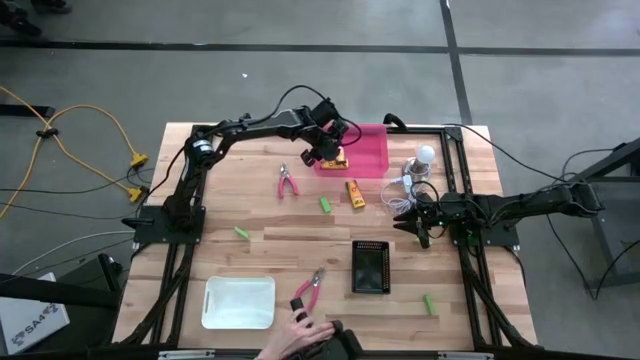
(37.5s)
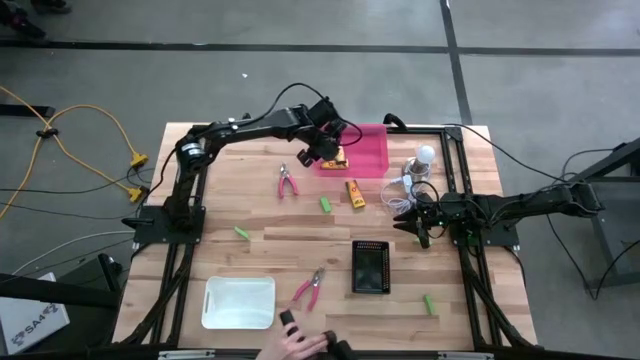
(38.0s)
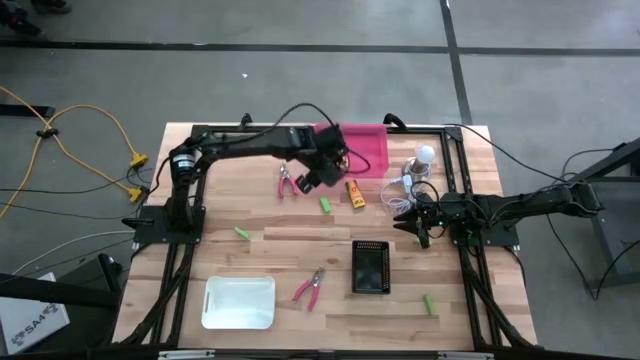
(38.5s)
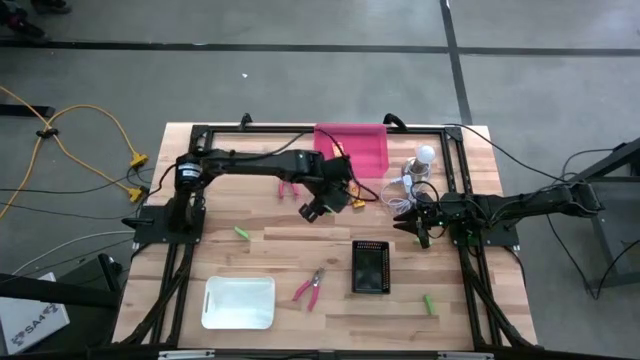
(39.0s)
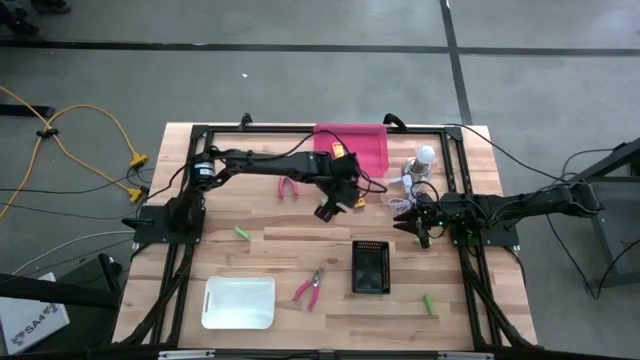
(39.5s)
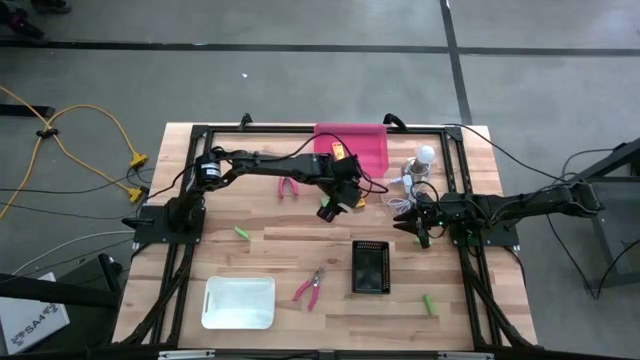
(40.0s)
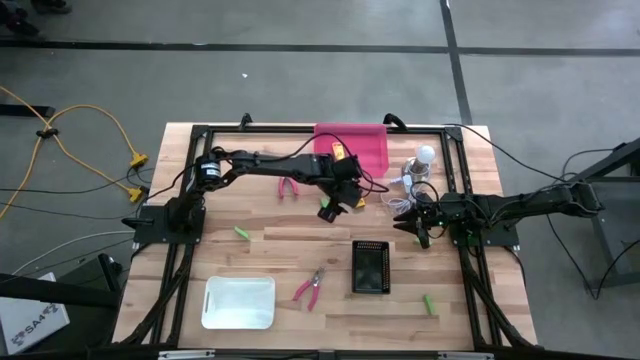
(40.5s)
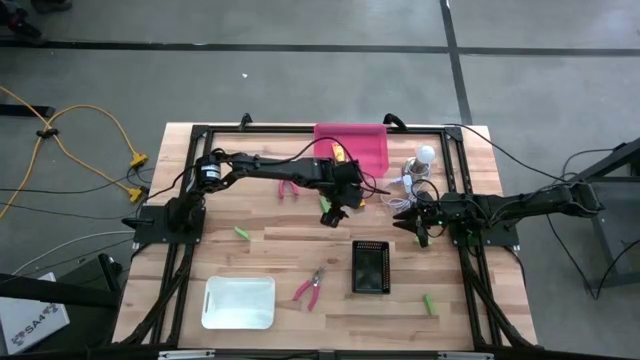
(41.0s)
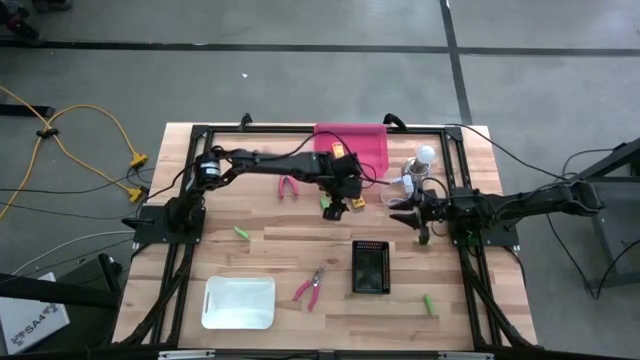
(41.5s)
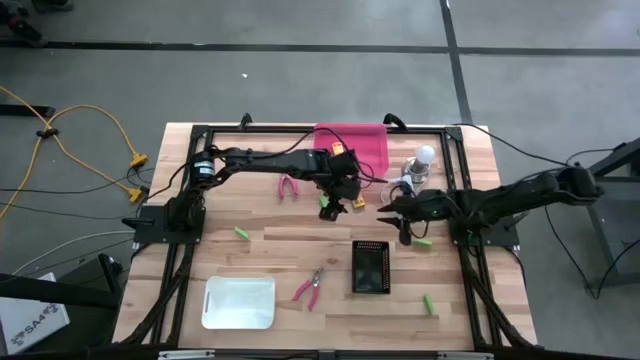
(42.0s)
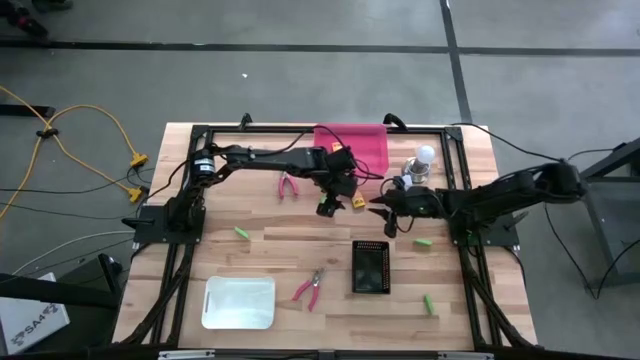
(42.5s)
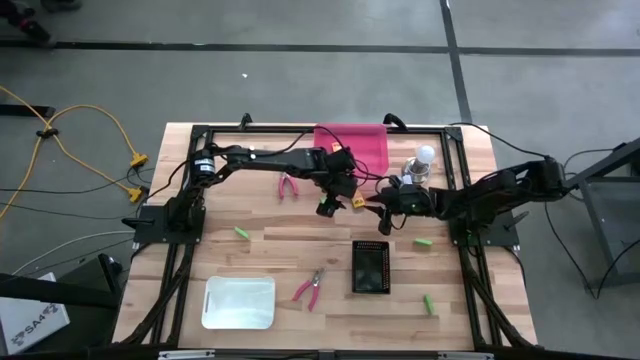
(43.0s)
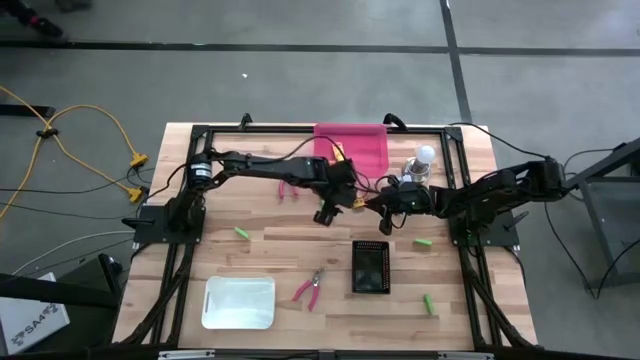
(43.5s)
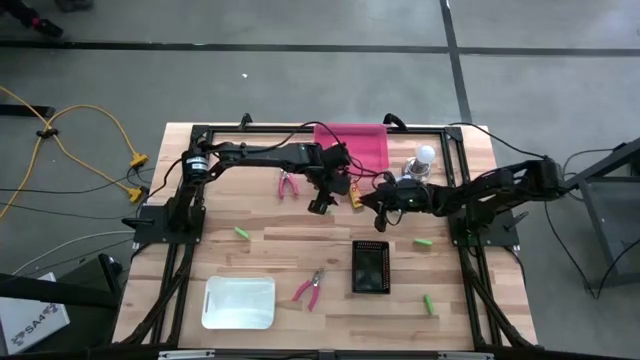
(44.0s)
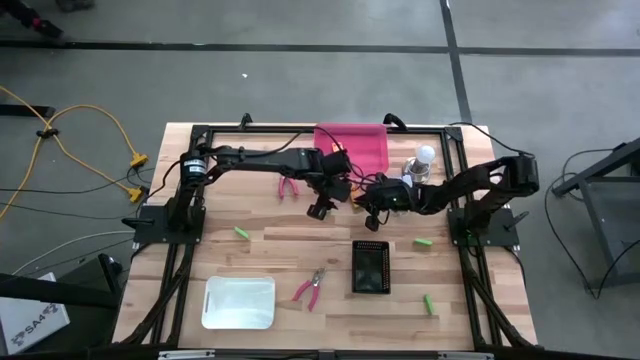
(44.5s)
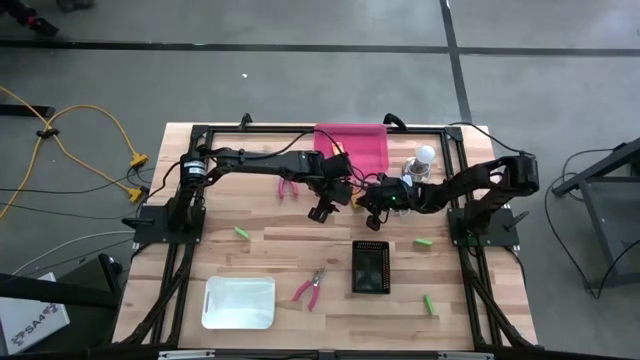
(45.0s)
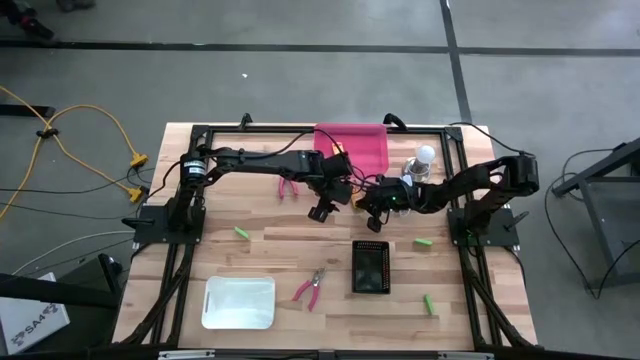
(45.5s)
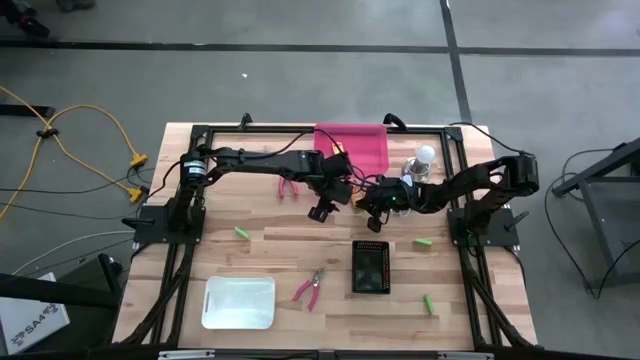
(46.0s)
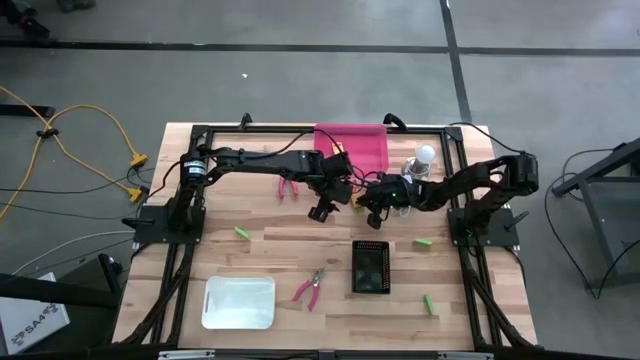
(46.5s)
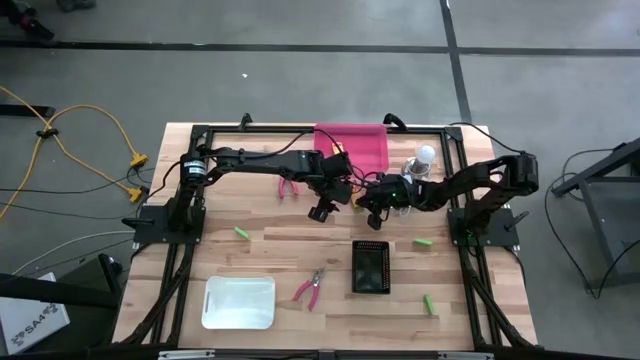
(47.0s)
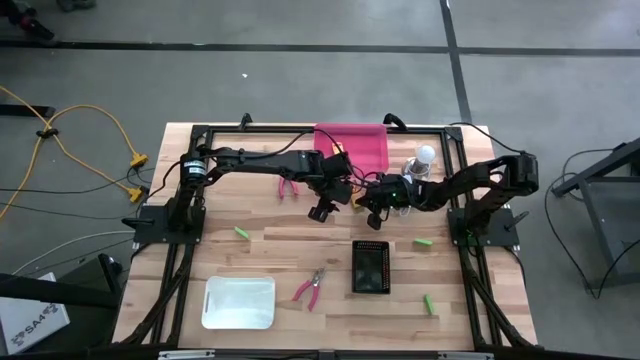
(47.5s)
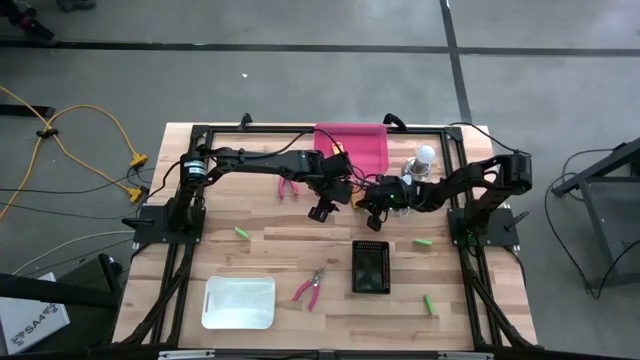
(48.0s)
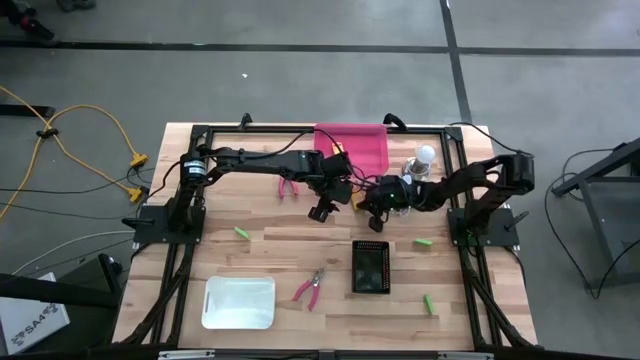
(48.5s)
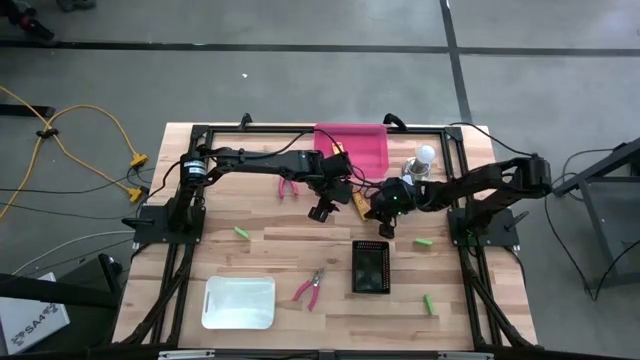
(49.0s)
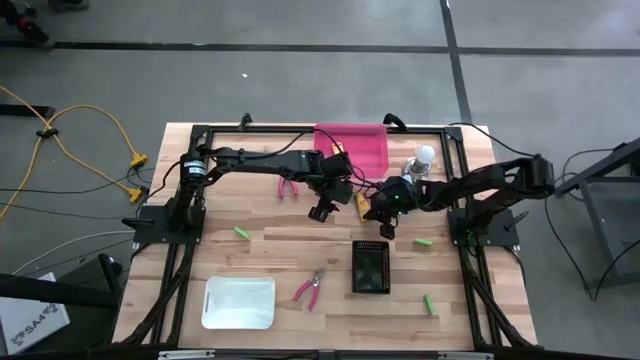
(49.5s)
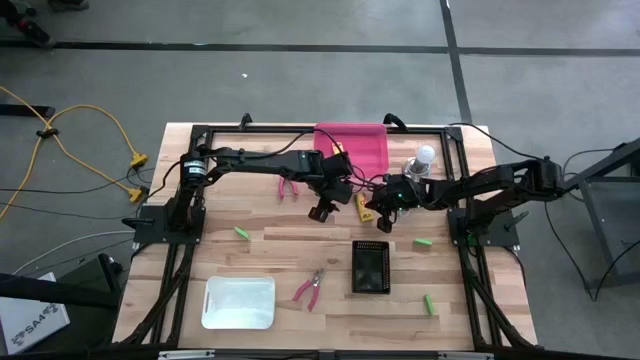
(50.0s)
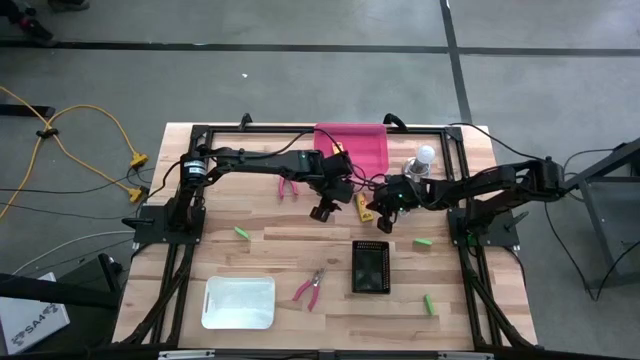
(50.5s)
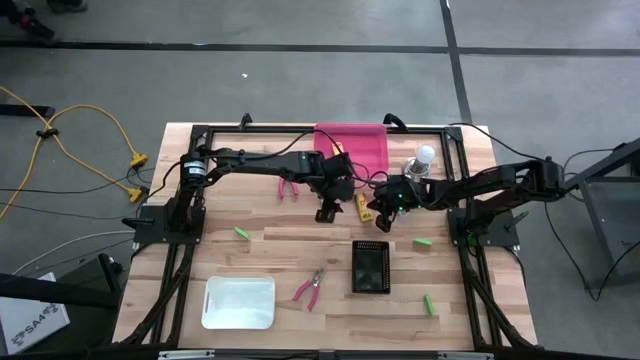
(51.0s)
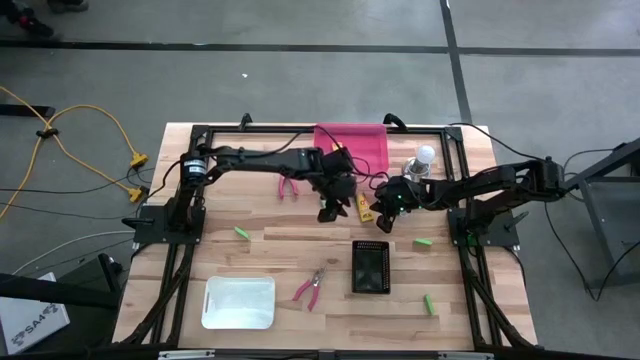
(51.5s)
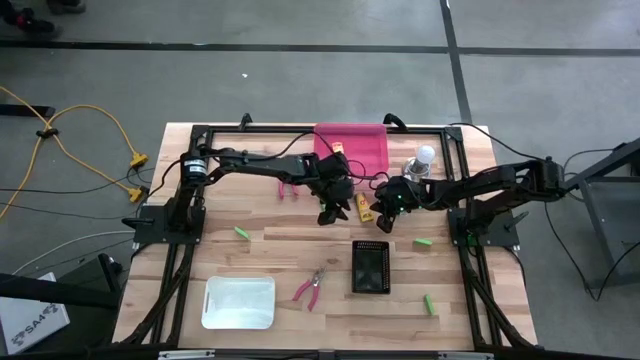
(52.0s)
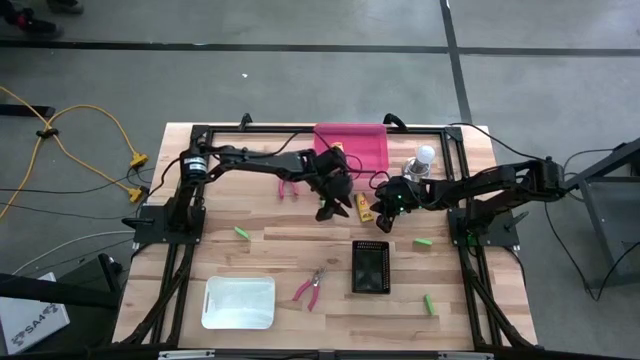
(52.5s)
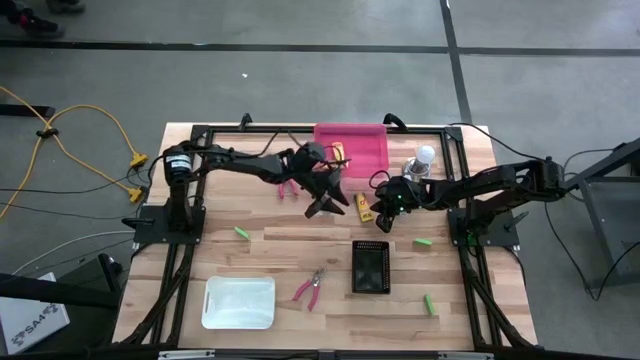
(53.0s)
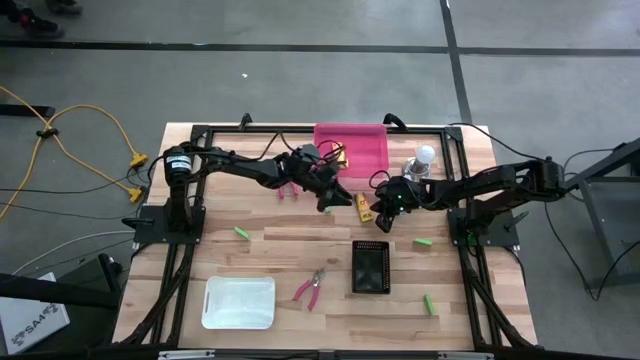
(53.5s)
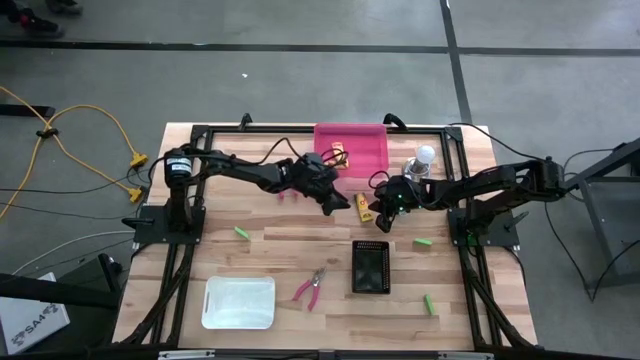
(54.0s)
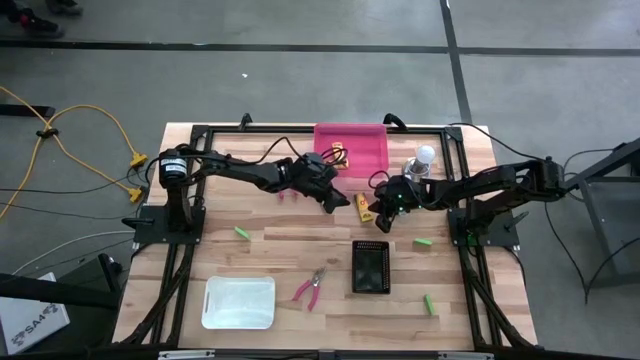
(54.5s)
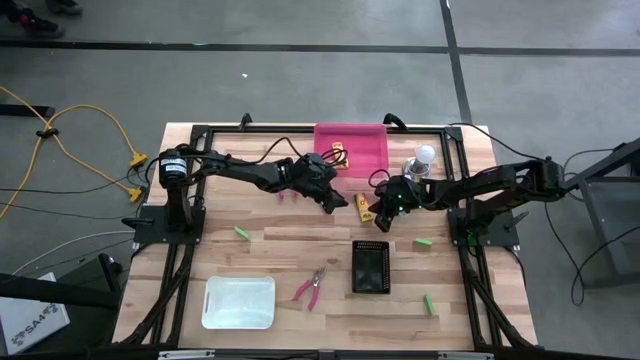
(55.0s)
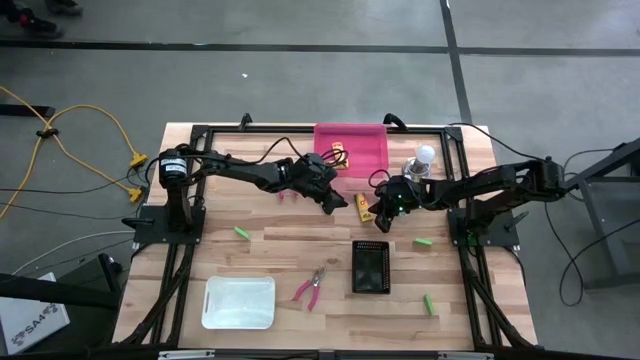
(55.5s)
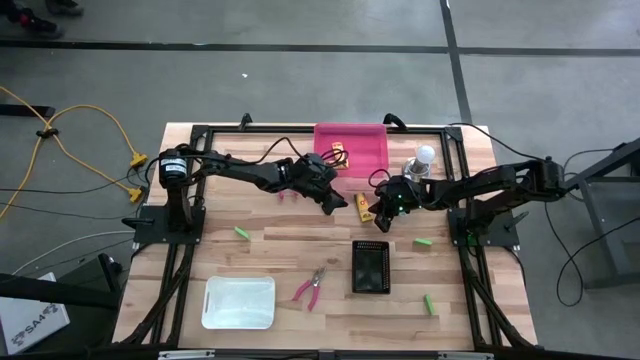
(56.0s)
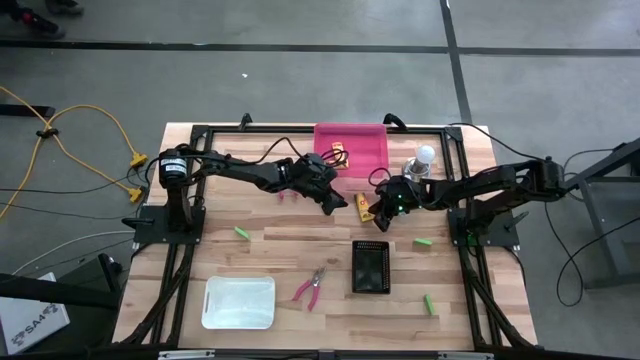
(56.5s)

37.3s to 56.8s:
Task: Pick & Place School Supplies
Put the yellow crayon box into the pink bin

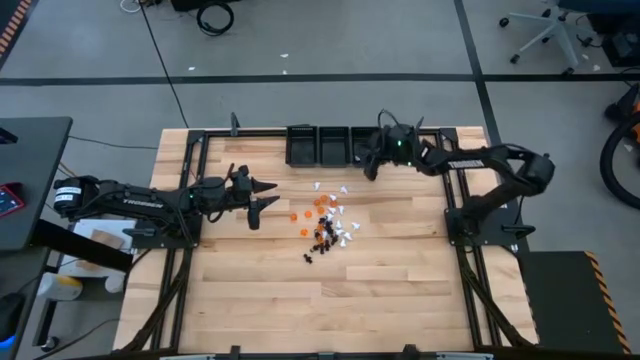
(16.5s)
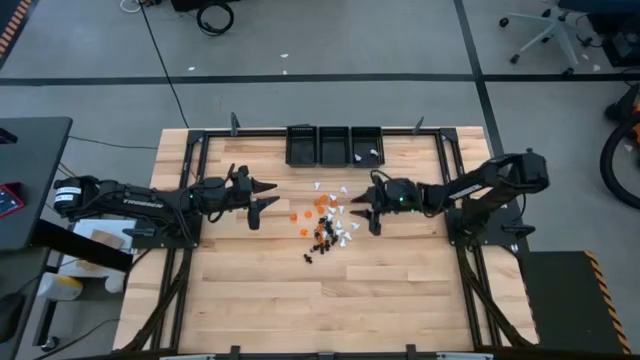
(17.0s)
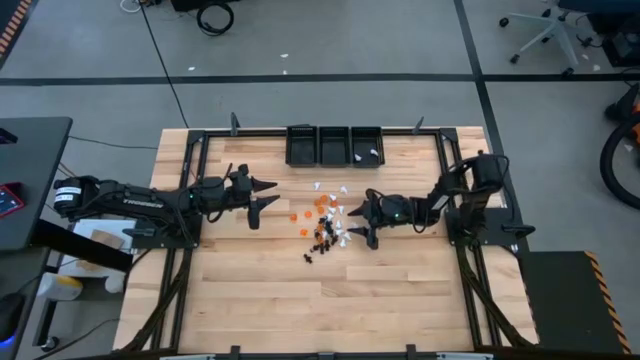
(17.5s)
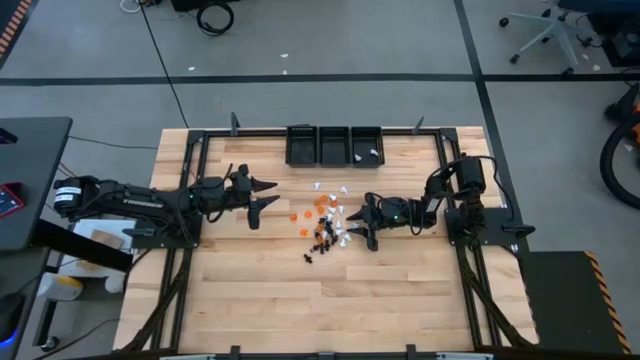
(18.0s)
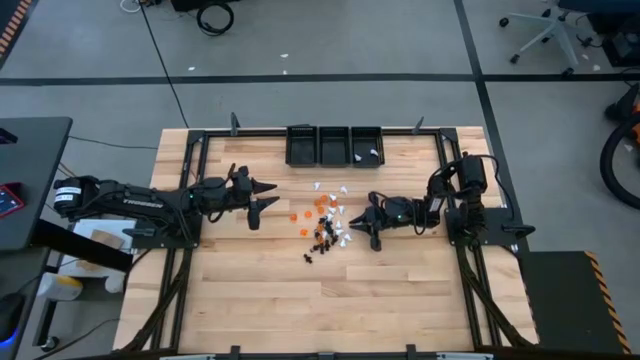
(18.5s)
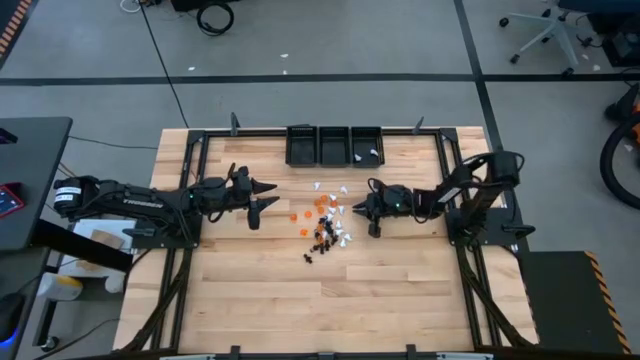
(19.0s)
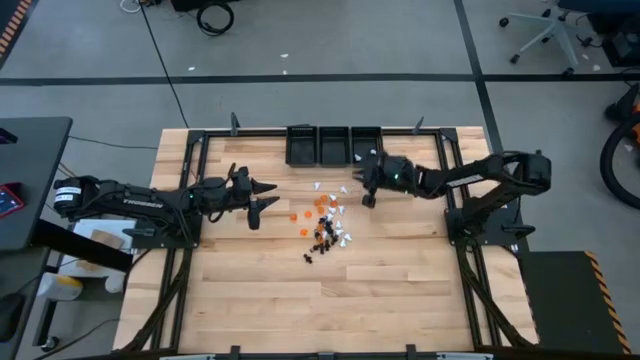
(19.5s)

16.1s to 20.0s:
Task: Sort game pieces by color
Put the white game piece into the right black basket
